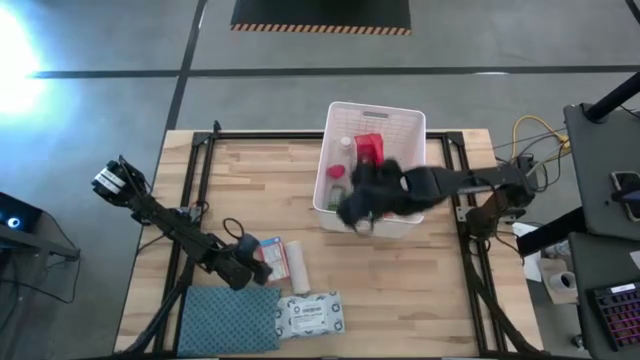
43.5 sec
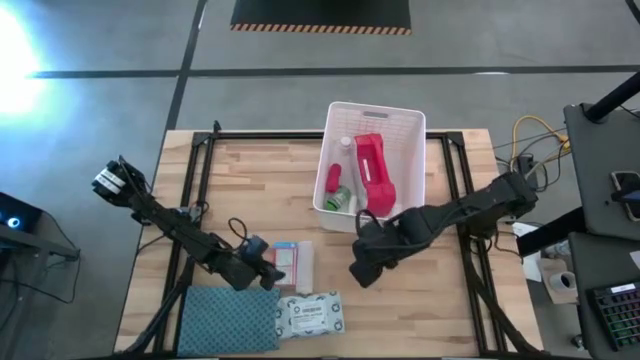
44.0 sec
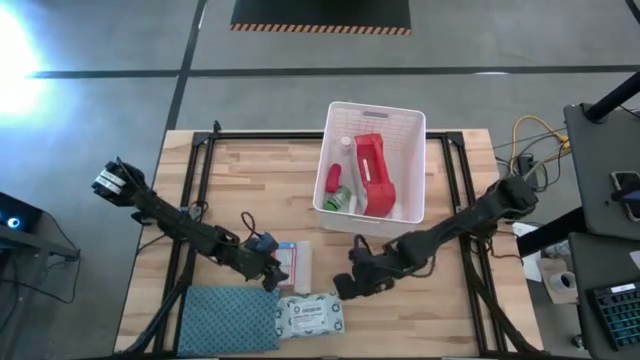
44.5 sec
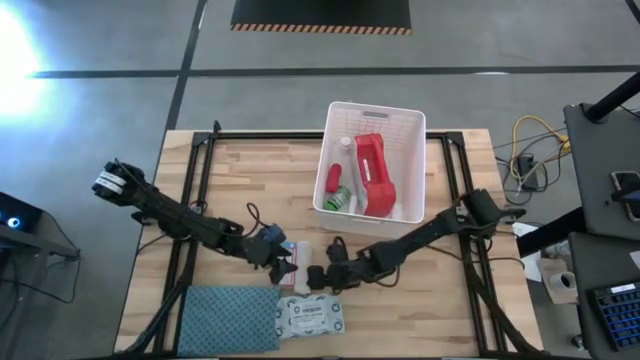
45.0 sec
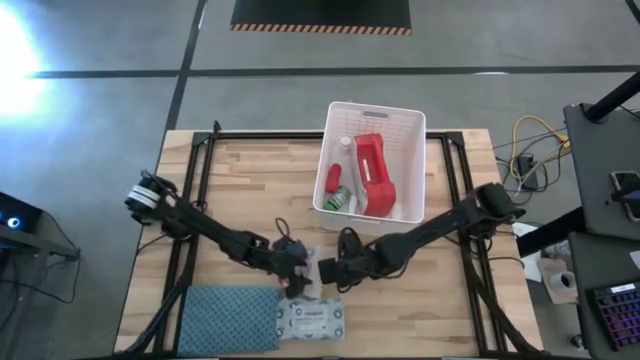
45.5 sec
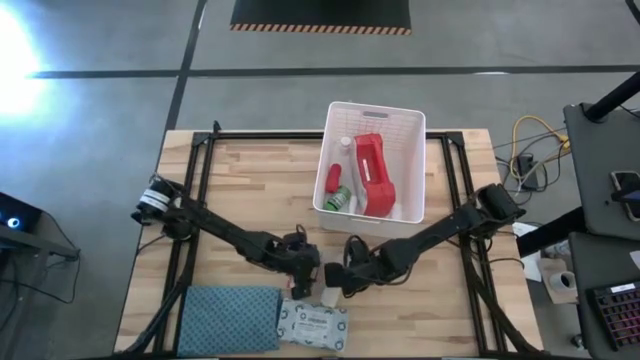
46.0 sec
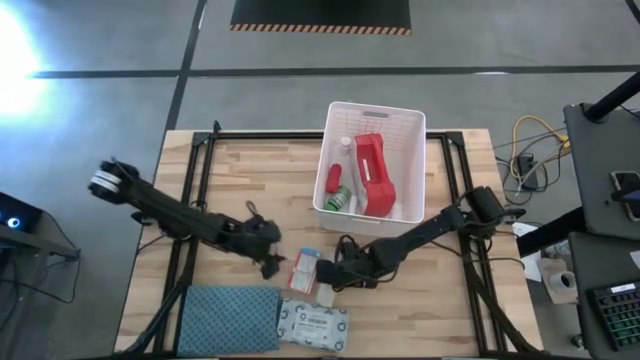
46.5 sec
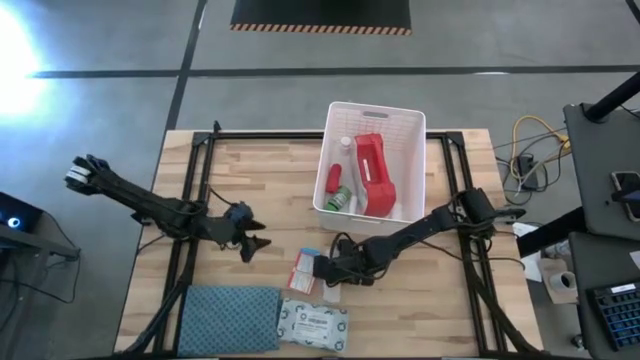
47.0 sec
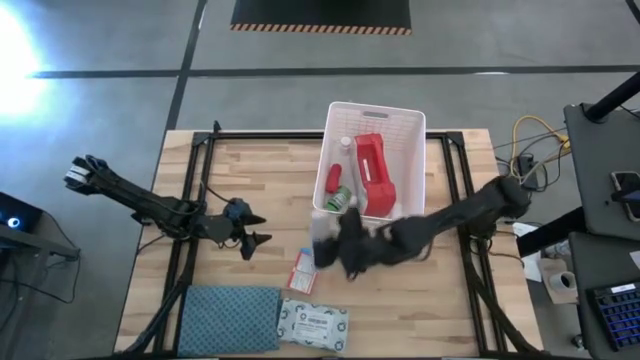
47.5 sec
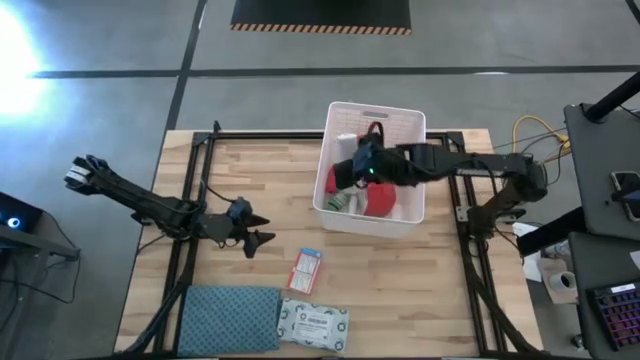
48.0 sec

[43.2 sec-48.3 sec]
Task: Pick & place medical supplies in basket/bin
Put the light brown bandage into the white bin

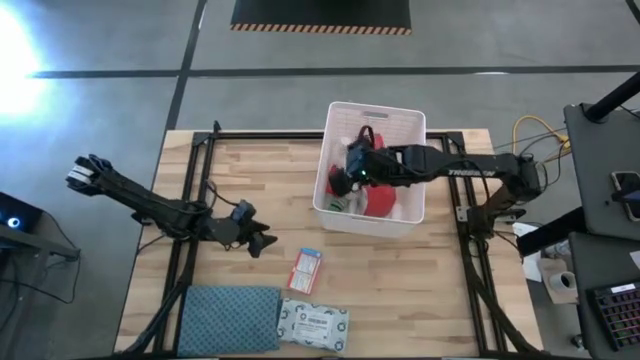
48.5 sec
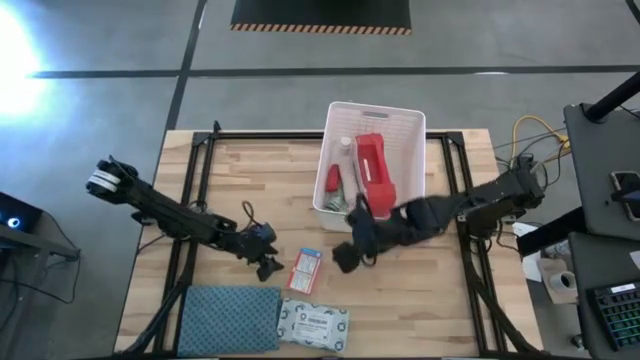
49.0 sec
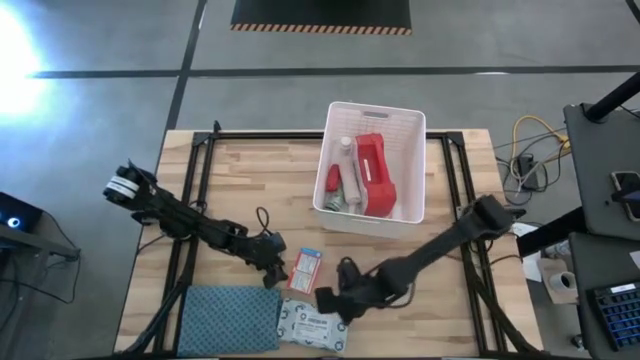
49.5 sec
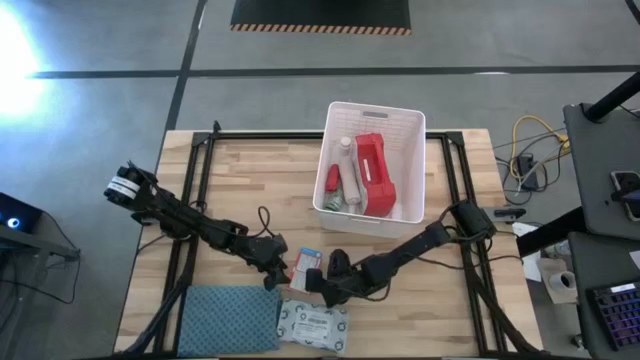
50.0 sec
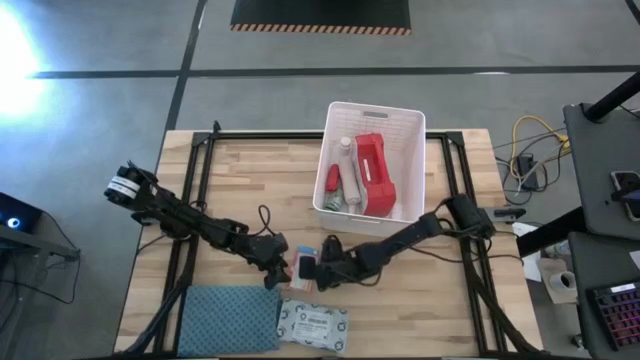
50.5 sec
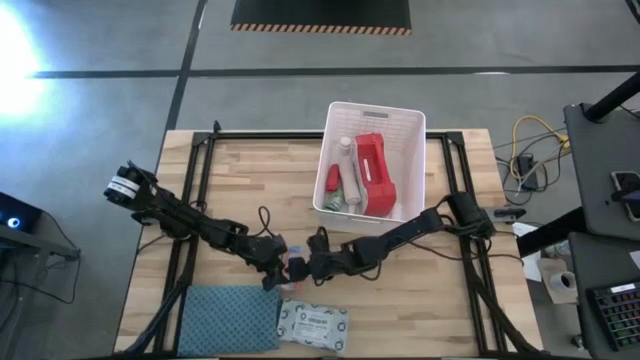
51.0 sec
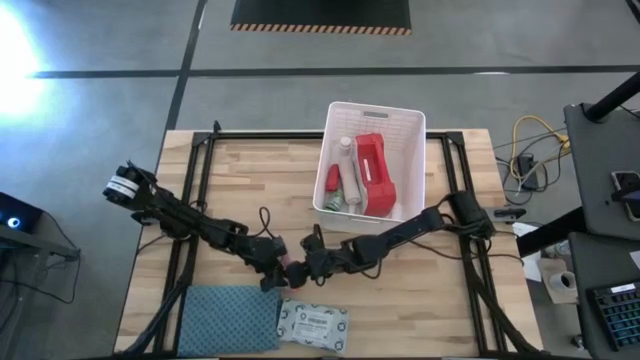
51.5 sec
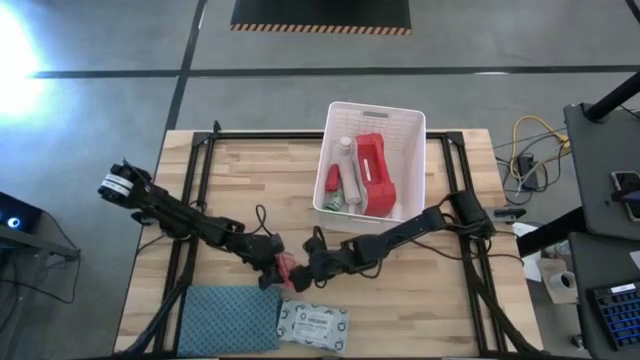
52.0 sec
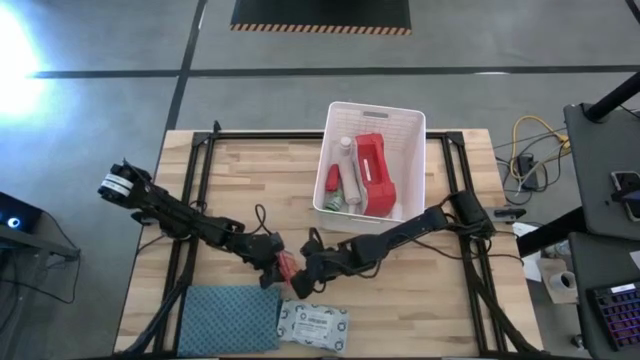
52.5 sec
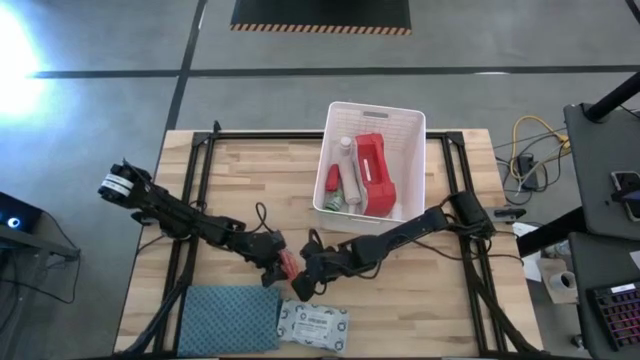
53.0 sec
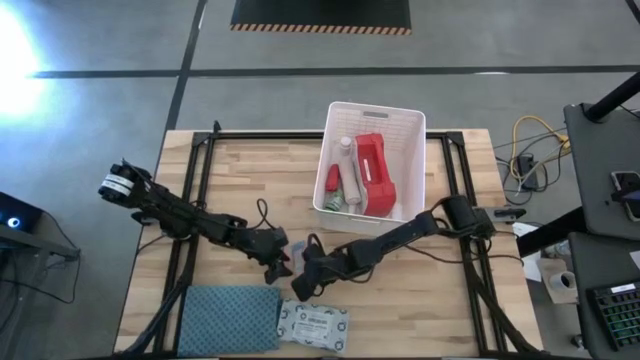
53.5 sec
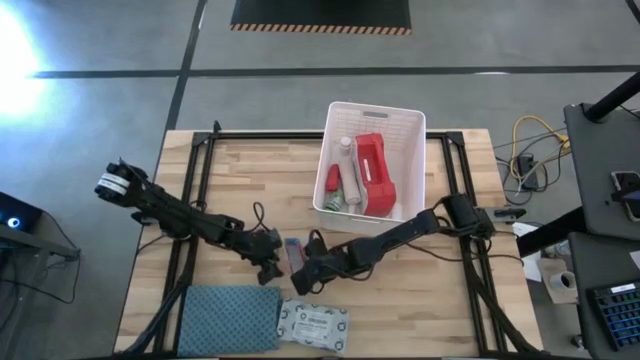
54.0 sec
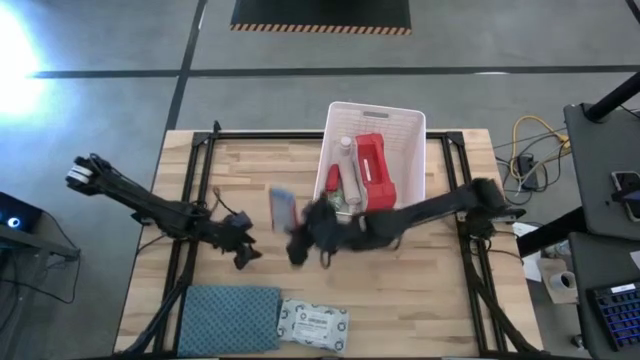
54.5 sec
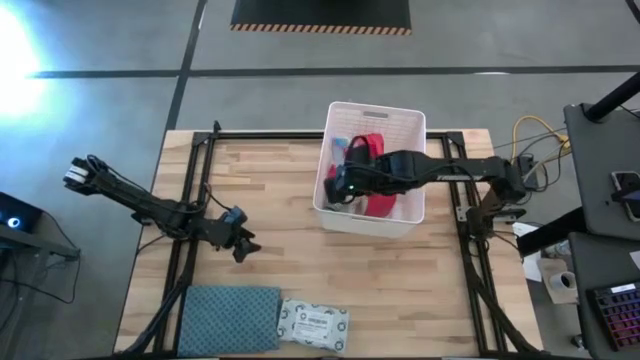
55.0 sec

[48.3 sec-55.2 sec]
Put the red medicine box into the white bin

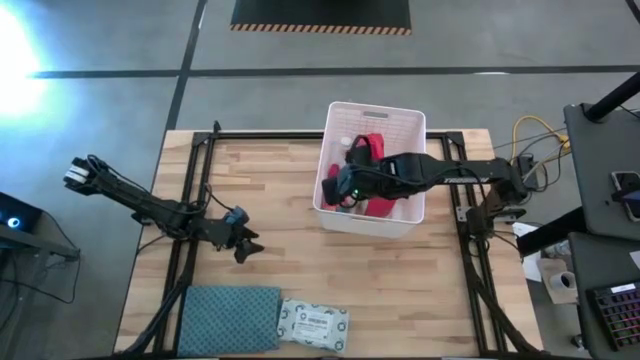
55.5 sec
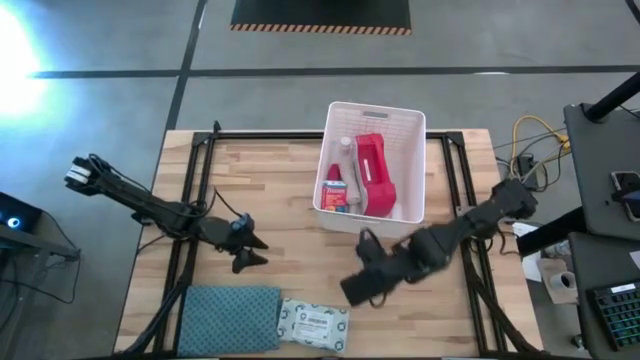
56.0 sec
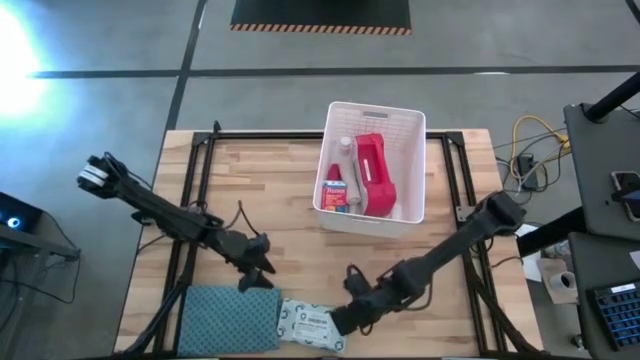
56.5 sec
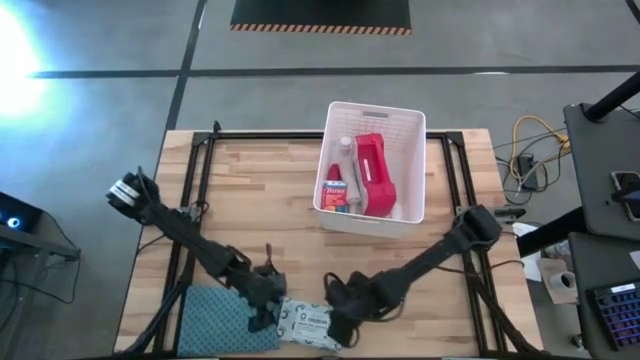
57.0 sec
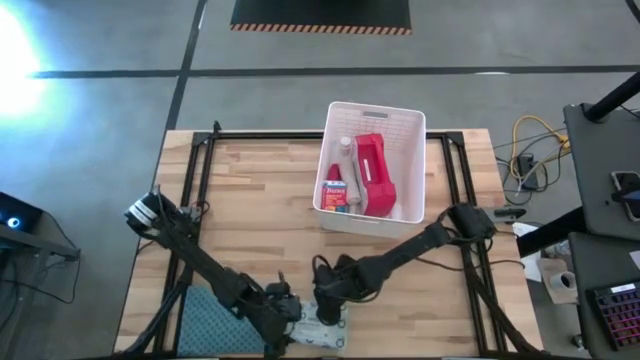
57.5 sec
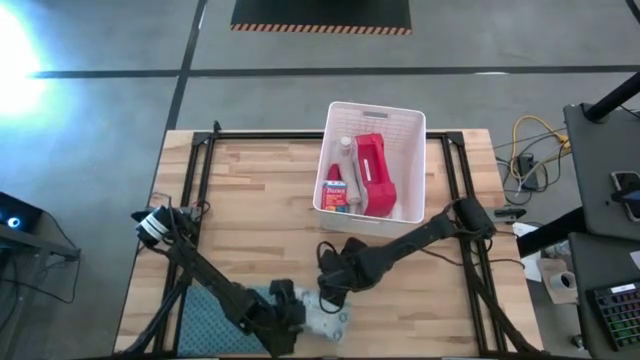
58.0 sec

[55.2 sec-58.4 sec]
Put the light blue mailer bag into the white bin

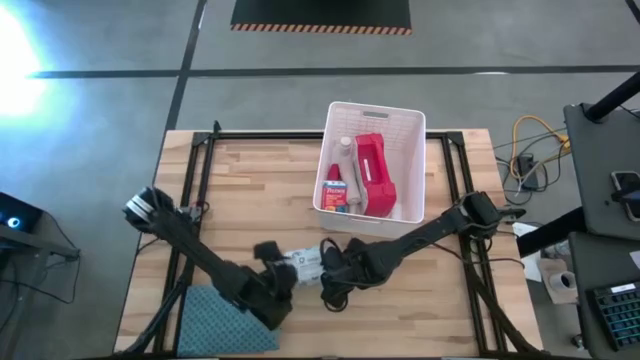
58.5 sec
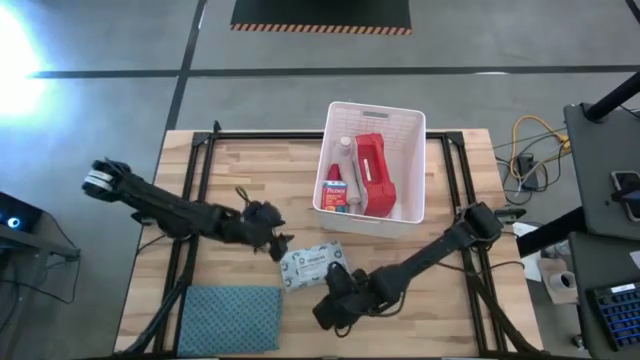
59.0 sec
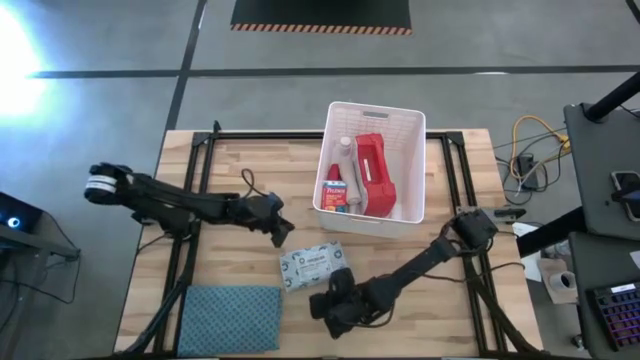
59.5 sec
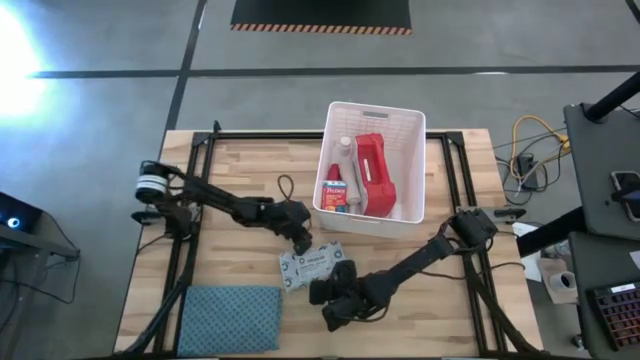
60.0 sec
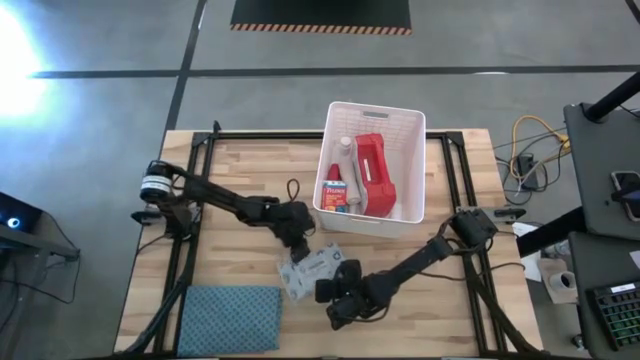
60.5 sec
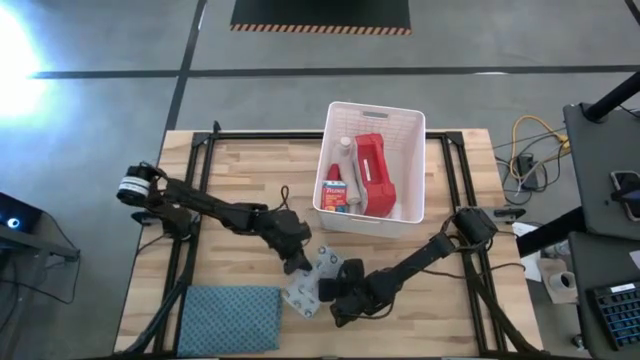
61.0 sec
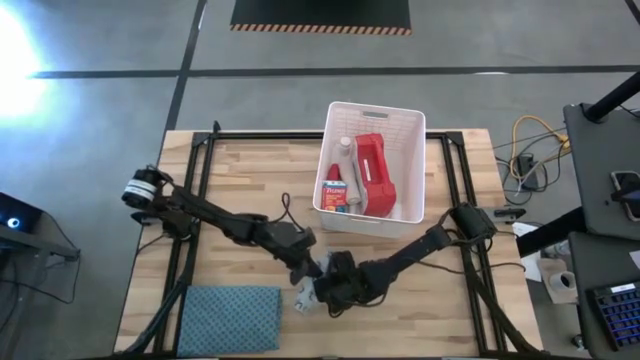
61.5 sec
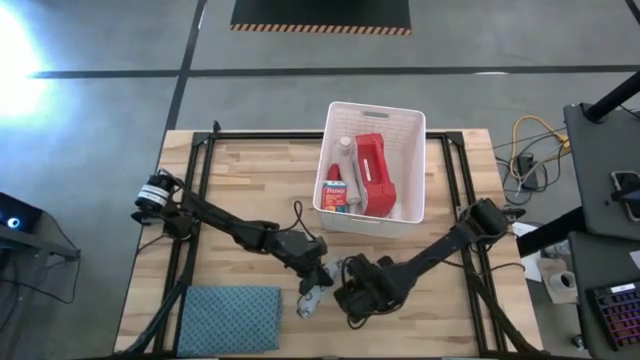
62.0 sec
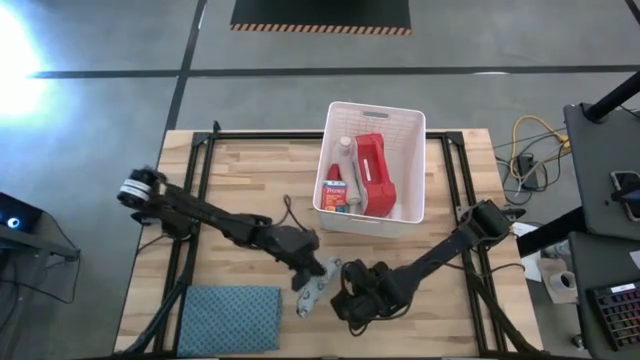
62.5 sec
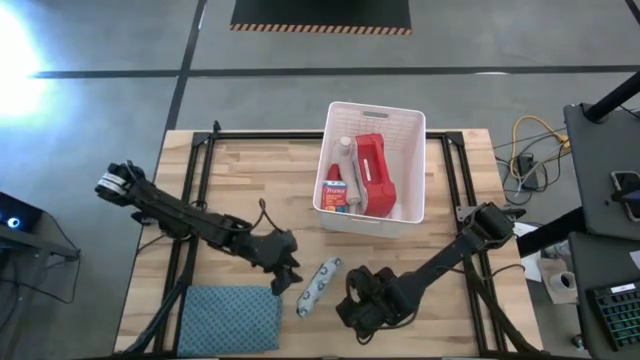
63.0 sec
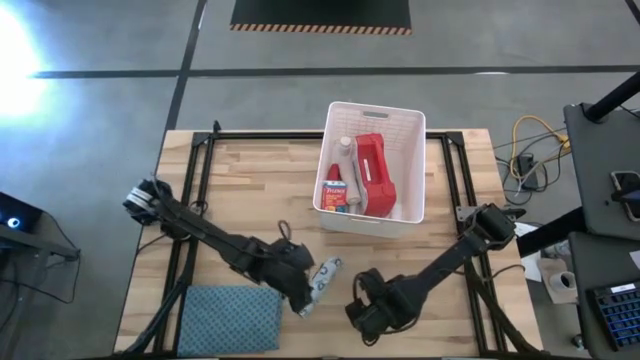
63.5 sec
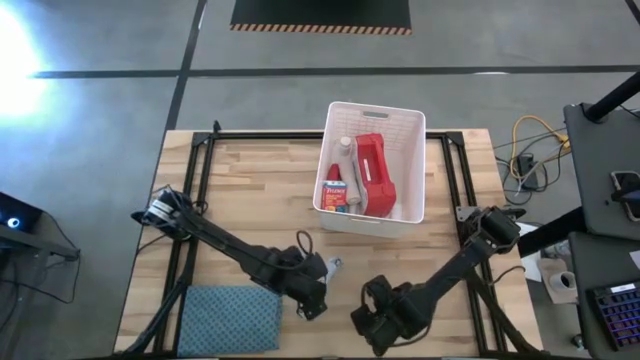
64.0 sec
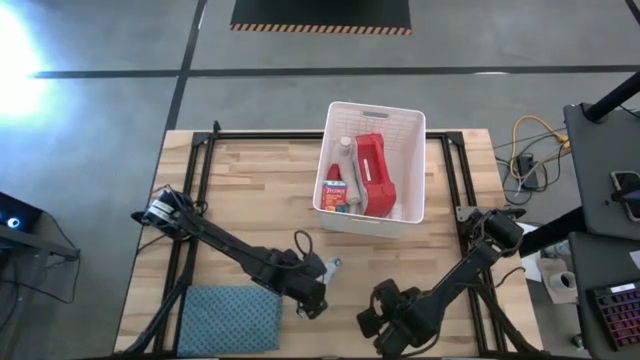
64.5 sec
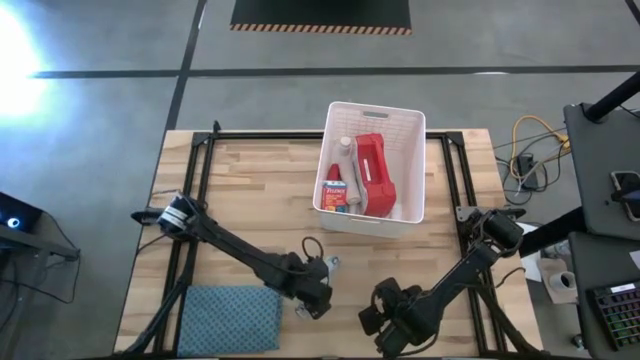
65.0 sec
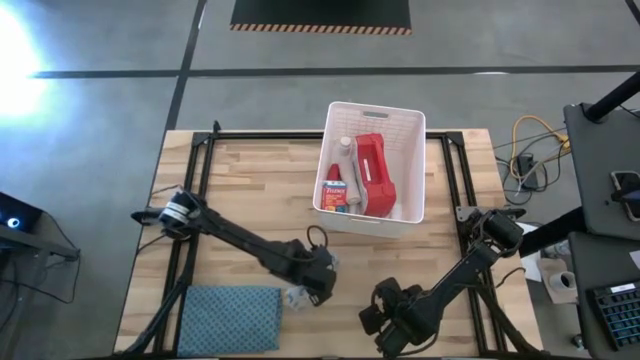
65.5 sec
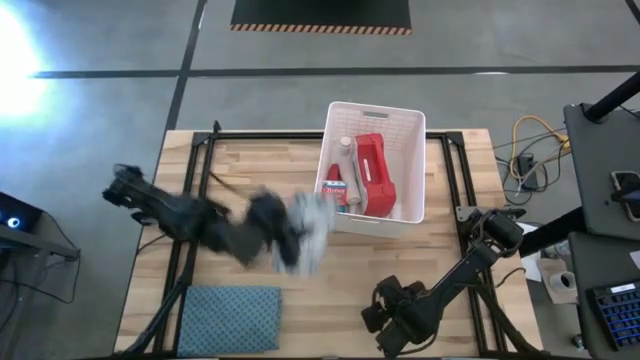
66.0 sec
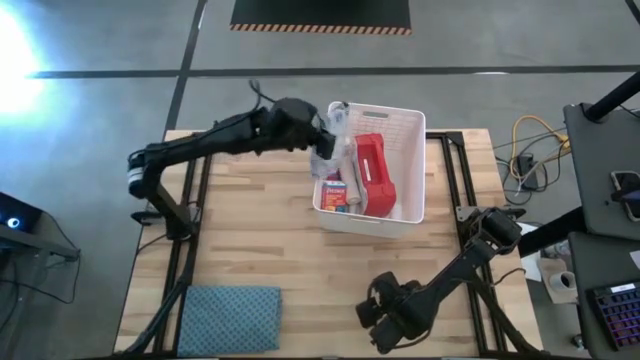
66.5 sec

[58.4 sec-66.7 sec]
Put the light blue mailer bag into the white bin
